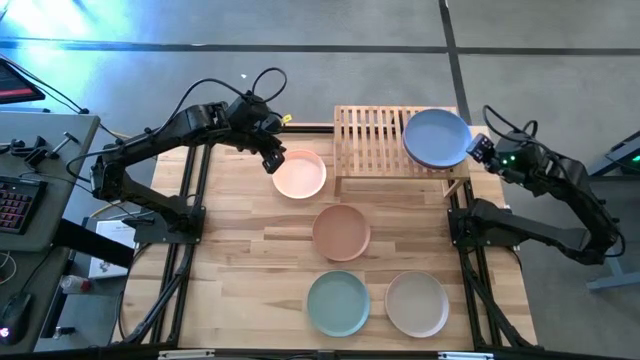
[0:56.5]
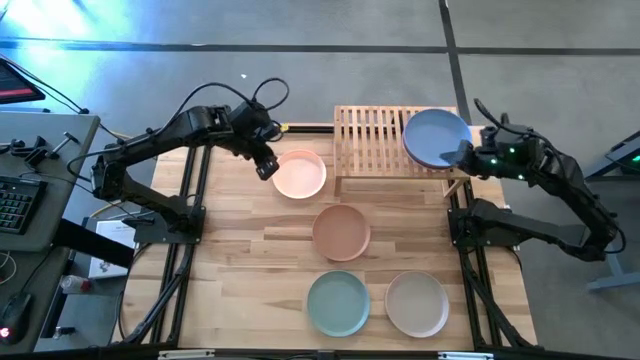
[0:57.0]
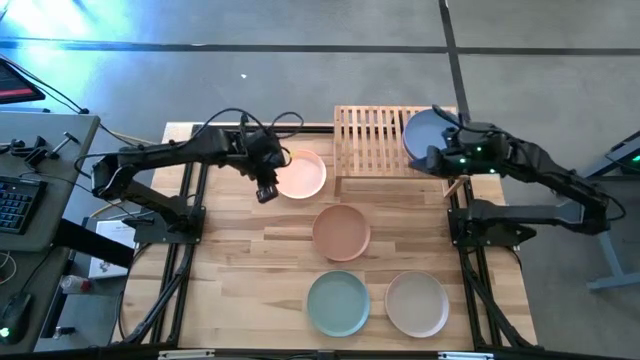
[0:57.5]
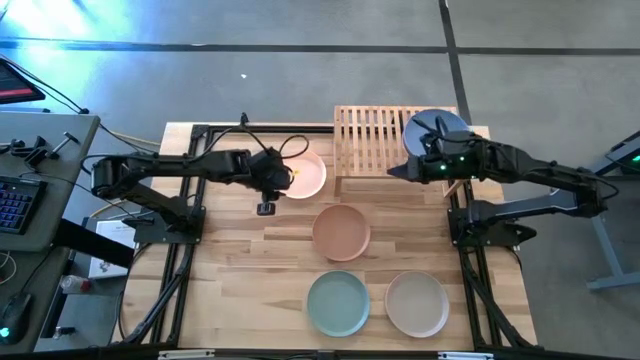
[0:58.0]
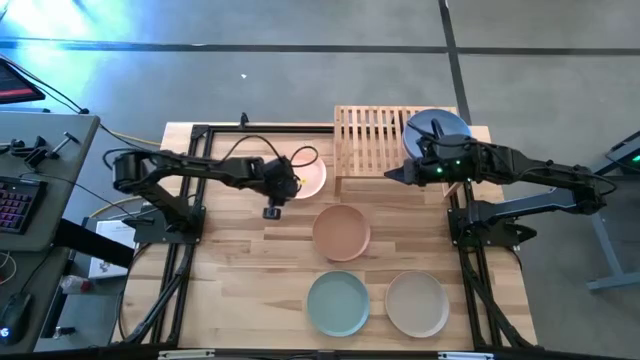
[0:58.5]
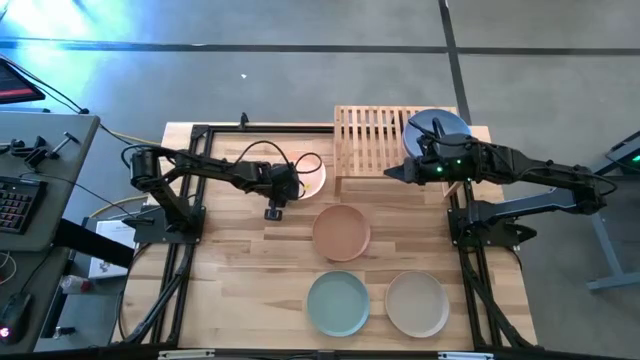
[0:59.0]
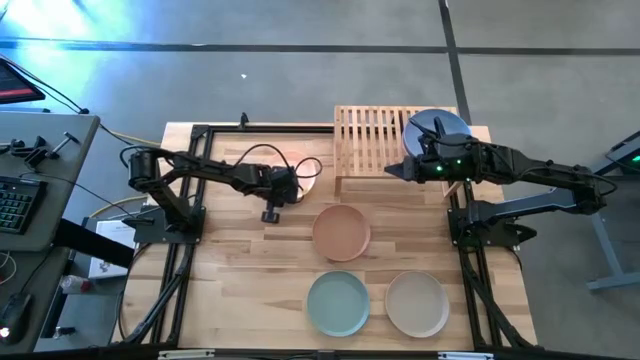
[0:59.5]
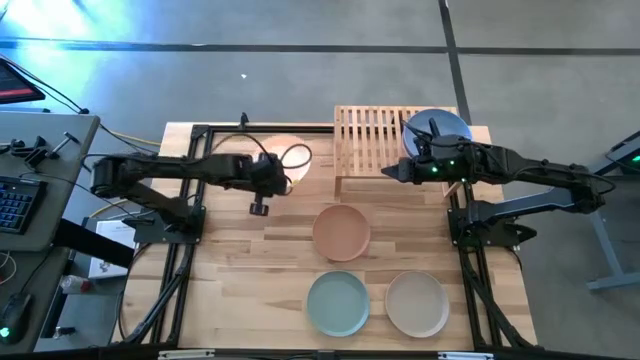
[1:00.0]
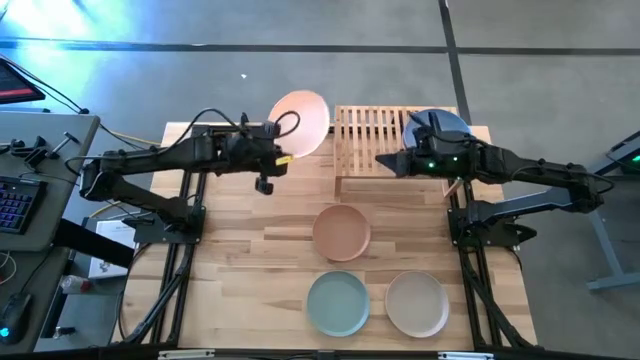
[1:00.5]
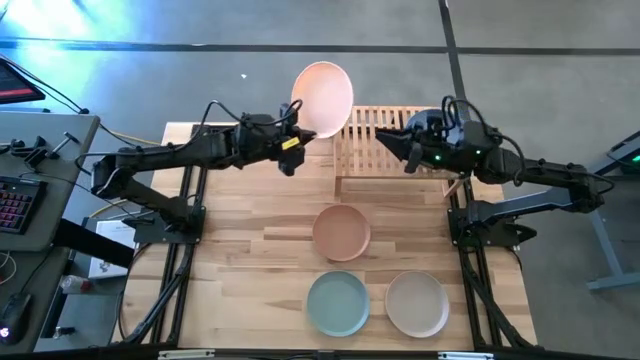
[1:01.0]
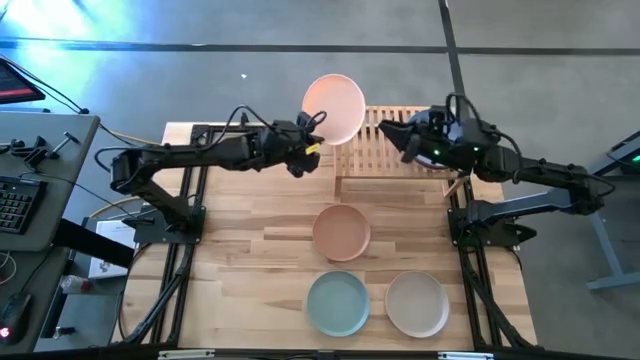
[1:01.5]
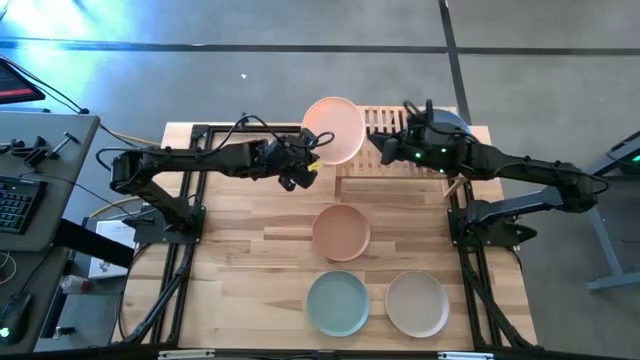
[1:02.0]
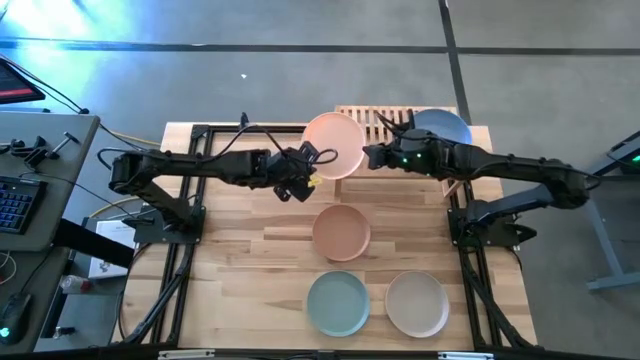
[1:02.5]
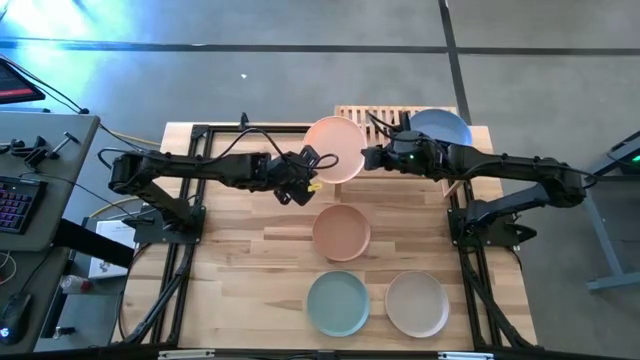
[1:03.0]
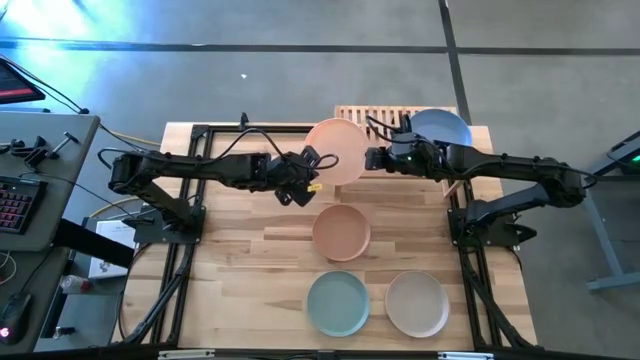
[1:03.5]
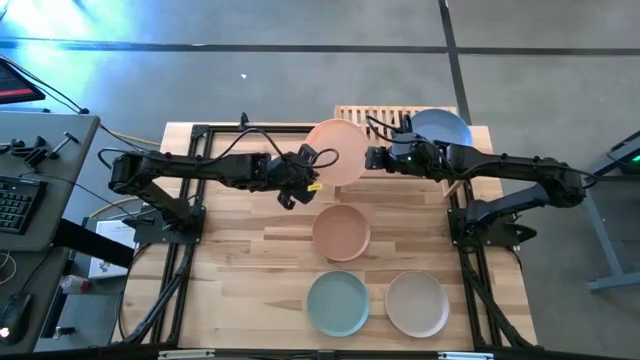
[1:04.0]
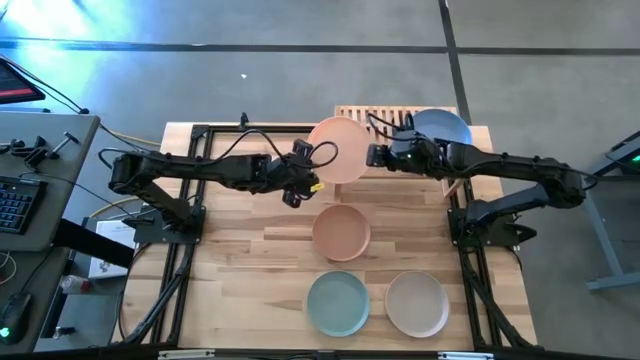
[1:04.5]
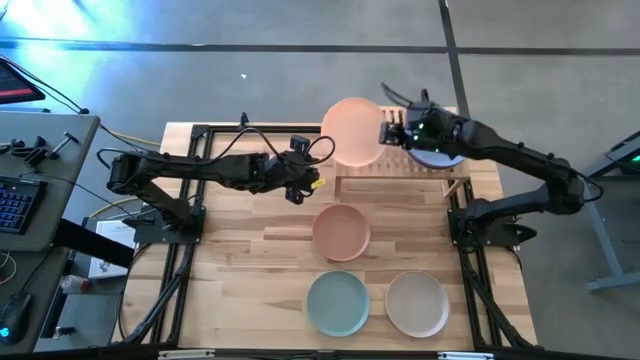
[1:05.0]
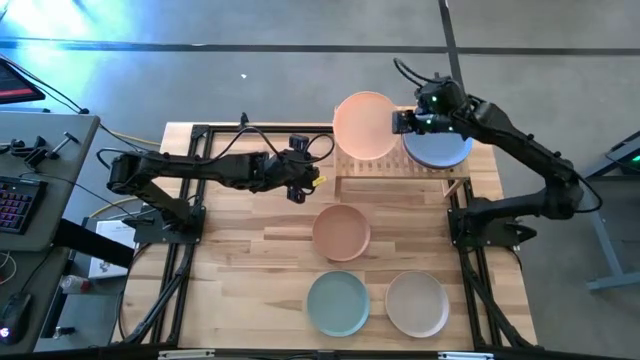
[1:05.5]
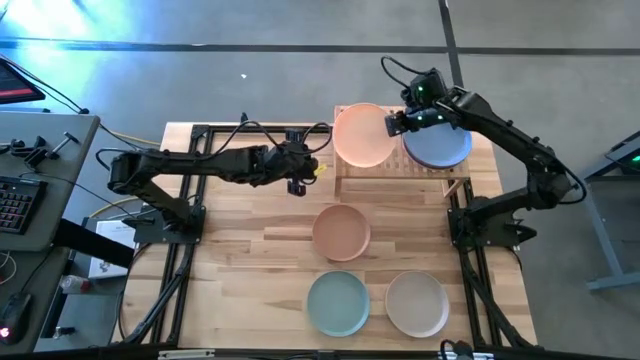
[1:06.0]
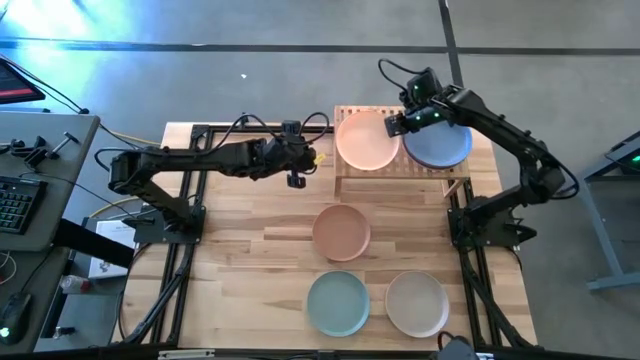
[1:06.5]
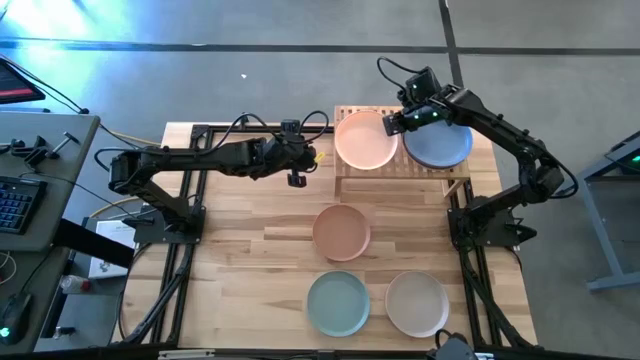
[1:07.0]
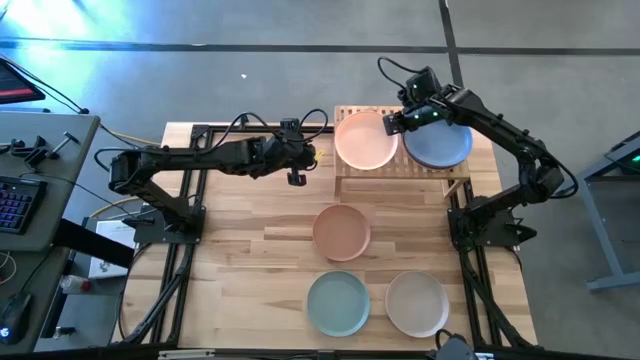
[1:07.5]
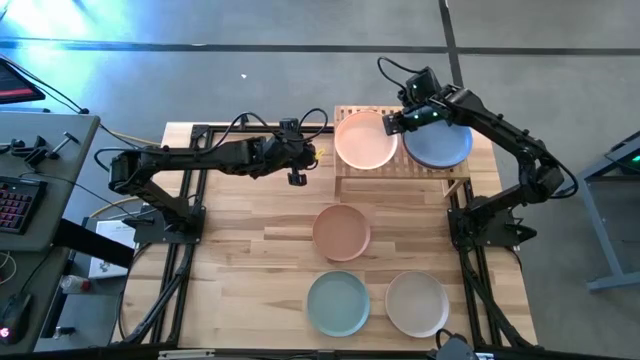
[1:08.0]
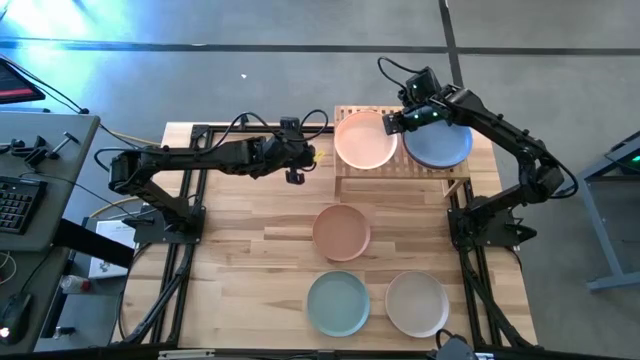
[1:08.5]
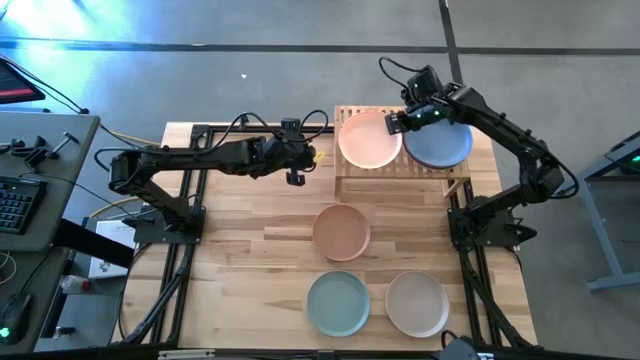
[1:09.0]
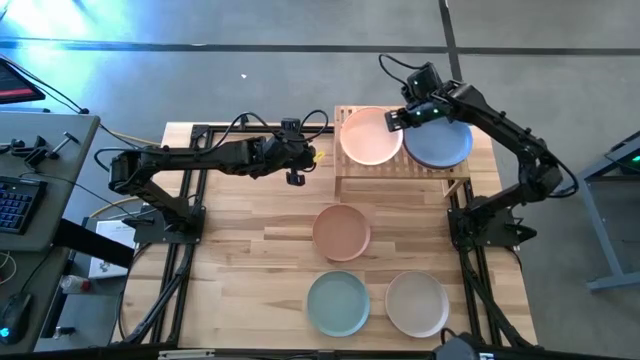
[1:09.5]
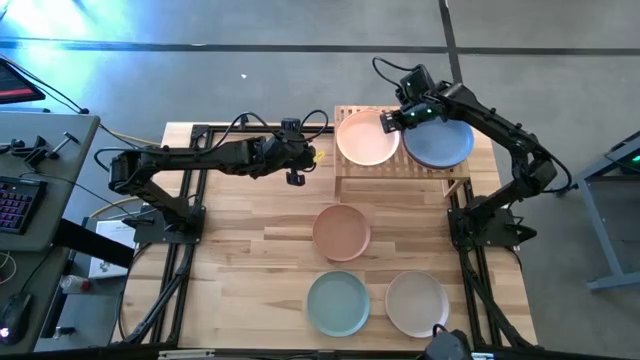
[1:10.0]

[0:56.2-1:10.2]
Task: Place and stack plates onto a shelf
Put the light orange plate on the shelf

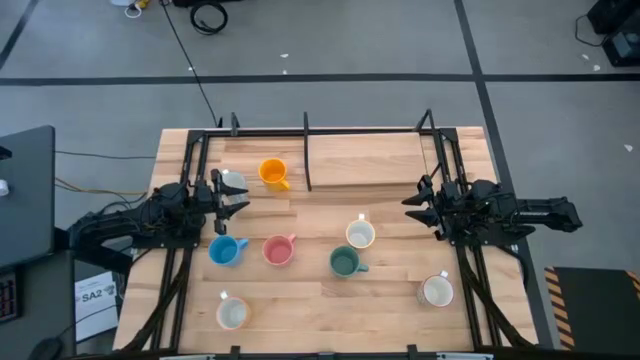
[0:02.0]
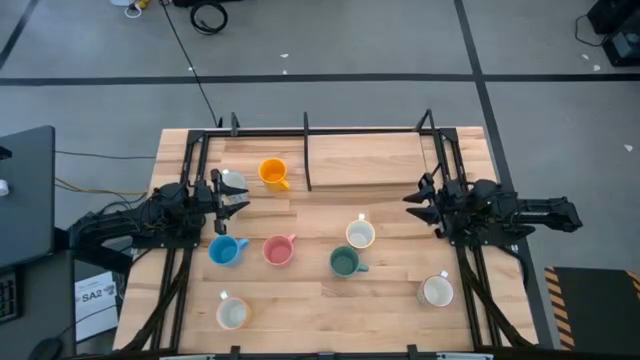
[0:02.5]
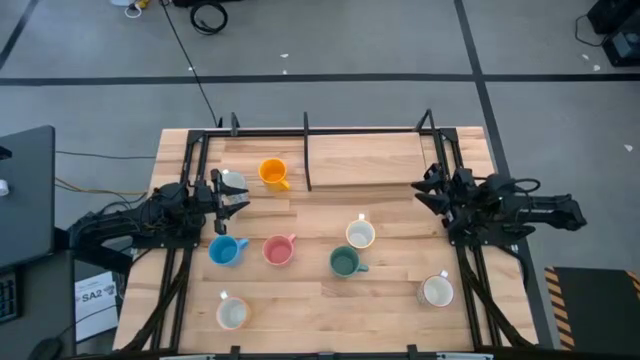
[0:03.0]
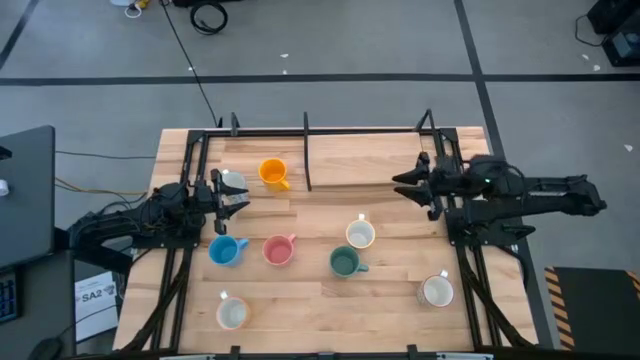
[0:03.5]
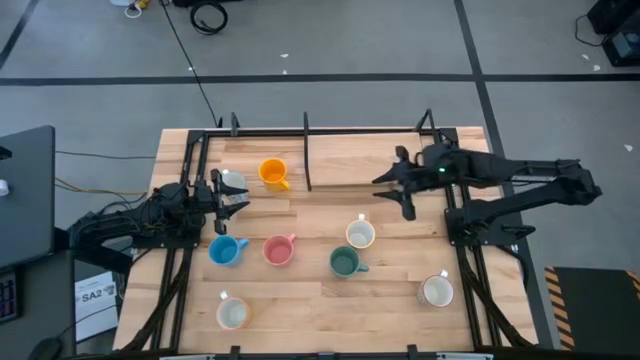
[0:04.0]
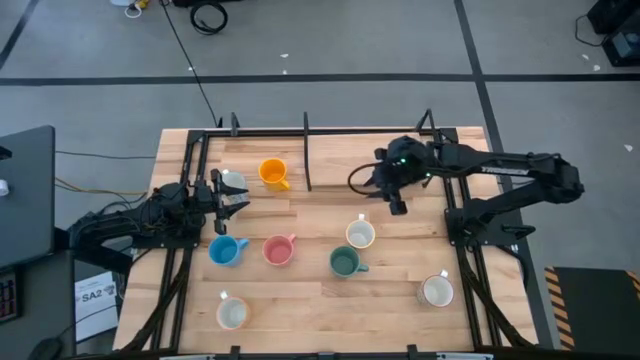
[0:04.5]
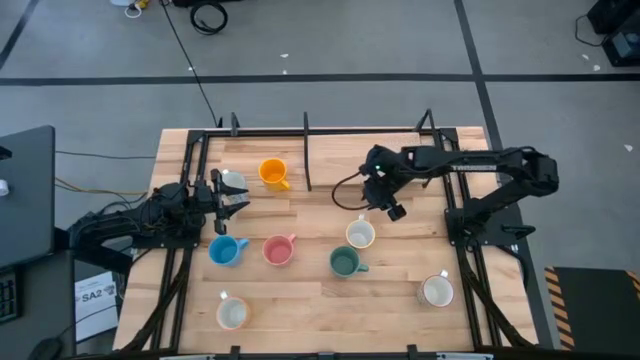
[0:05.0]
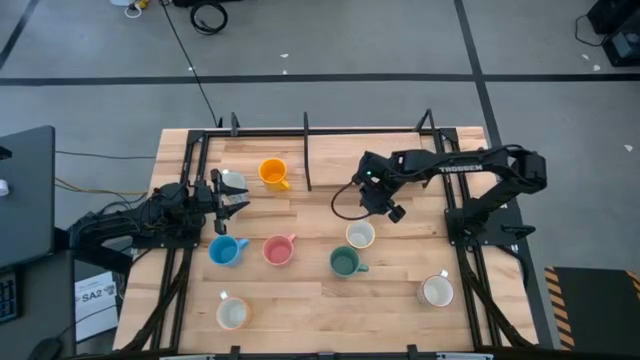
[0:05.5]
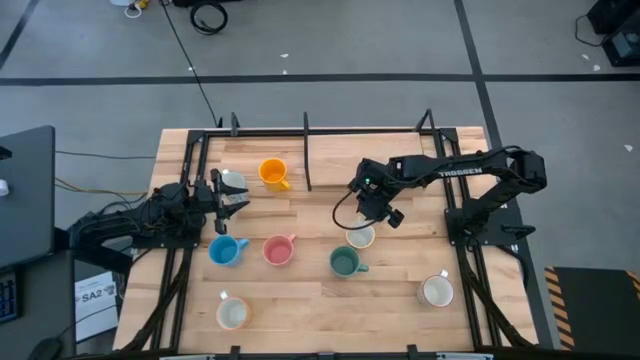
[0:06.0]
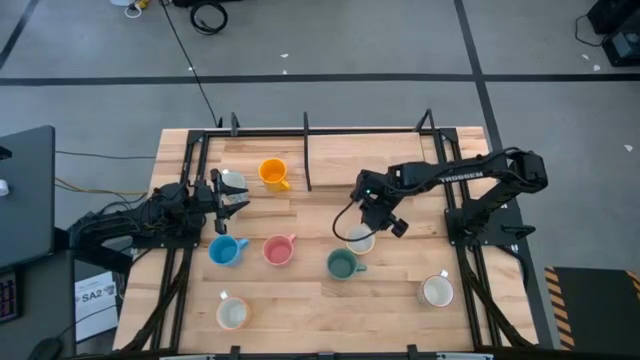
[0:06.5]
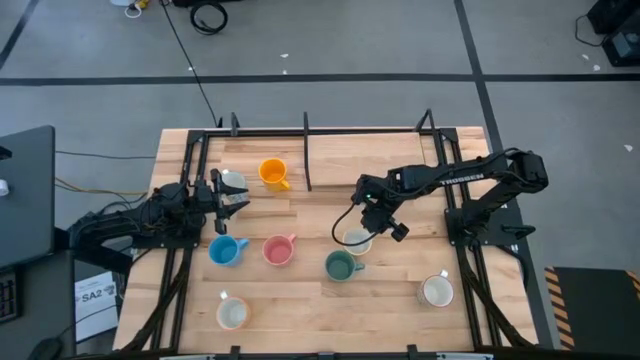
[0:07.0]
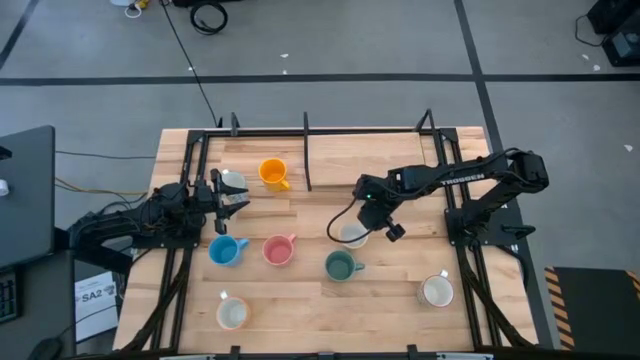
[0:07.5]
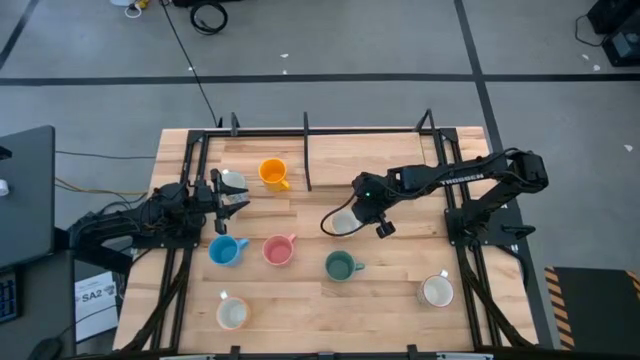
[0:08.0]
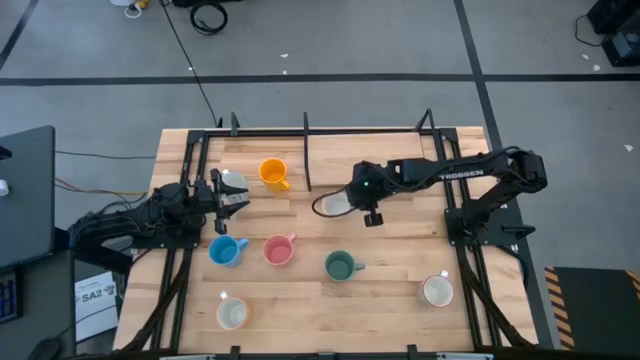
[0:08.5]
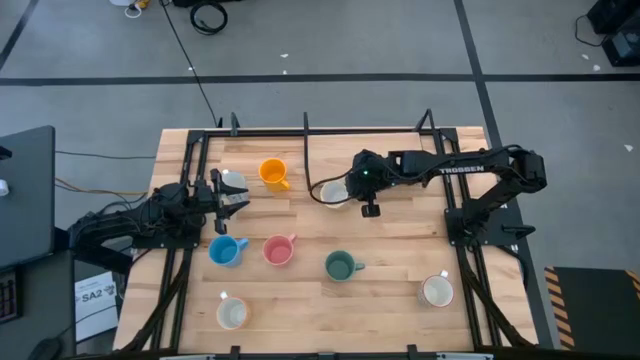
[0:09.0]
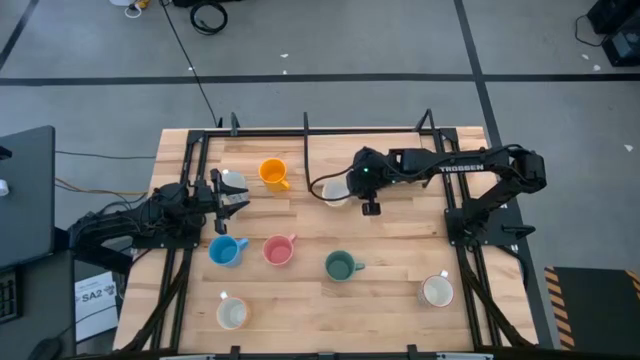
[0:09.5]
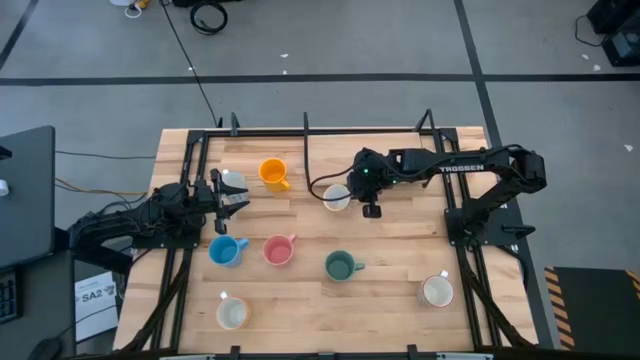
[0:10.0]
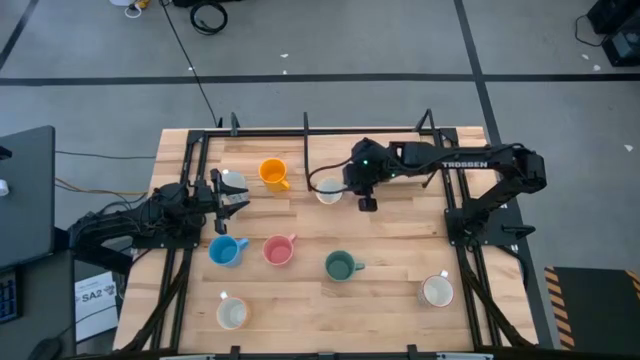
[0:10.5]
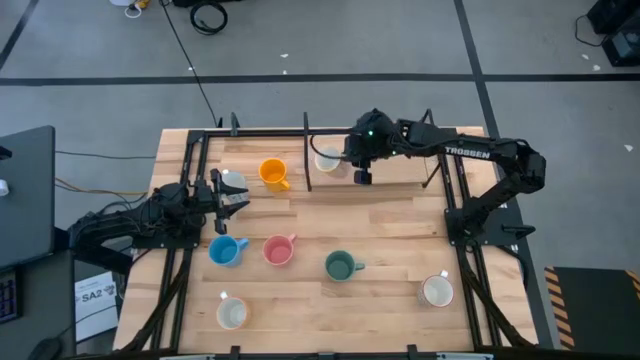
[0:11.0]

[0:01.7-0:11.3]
Task: Place coffee mugs
Put the orange and white patterned mug on the shelf
